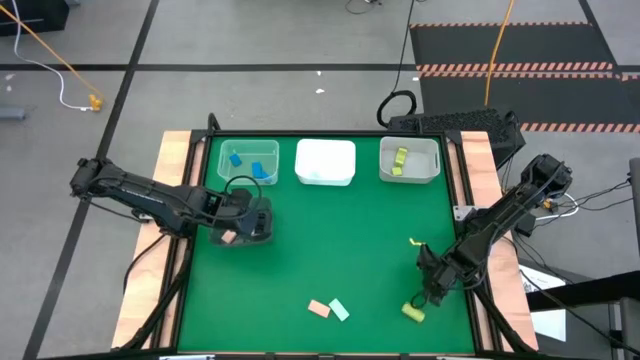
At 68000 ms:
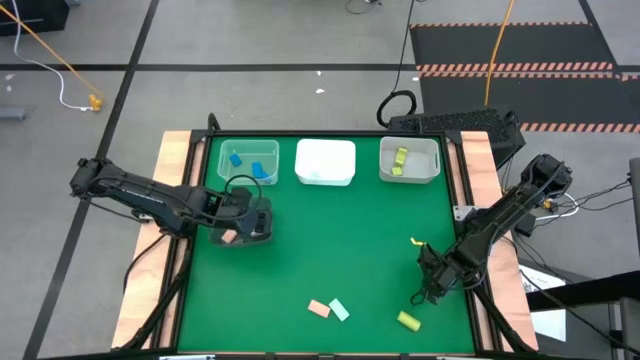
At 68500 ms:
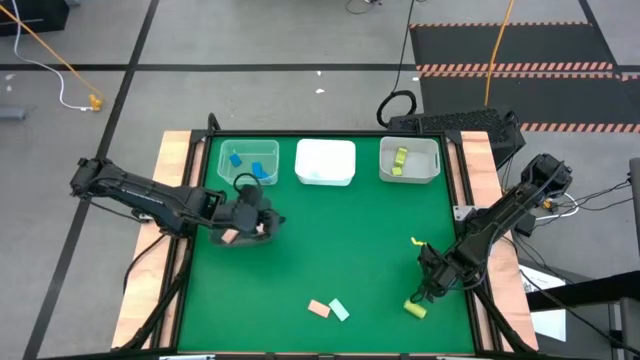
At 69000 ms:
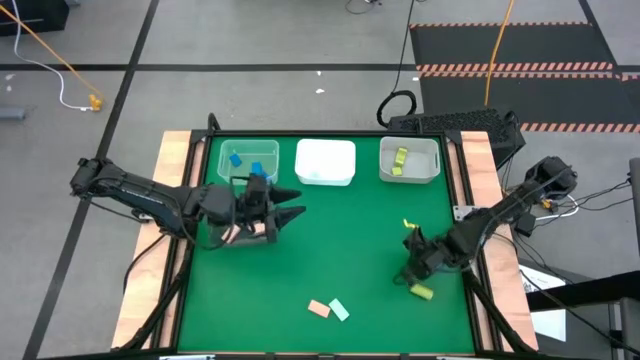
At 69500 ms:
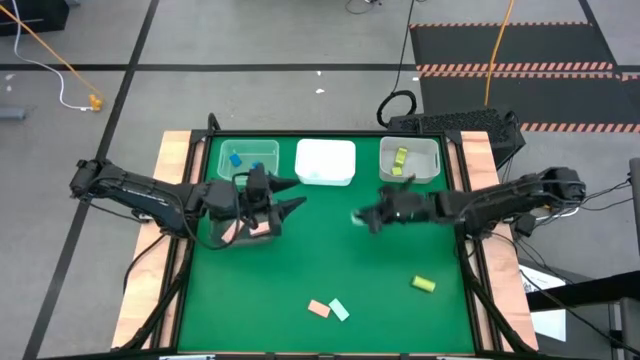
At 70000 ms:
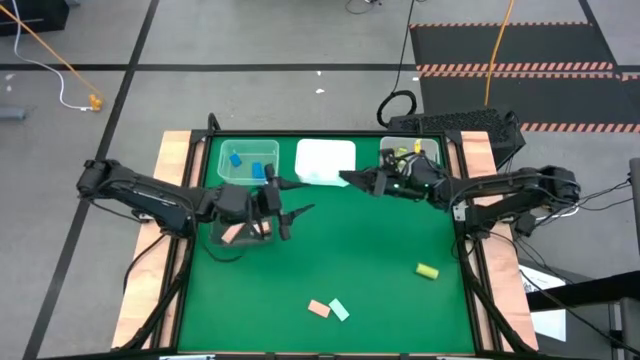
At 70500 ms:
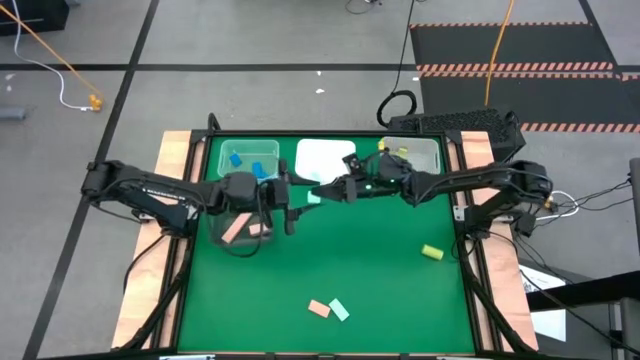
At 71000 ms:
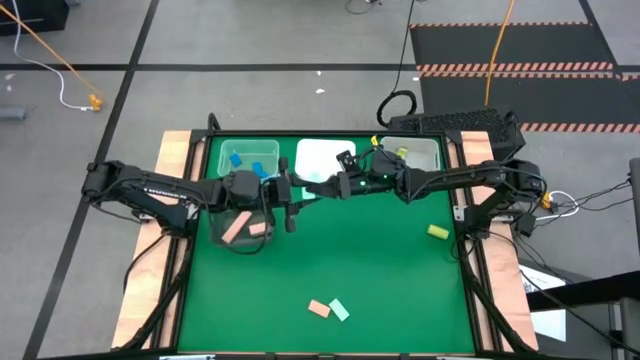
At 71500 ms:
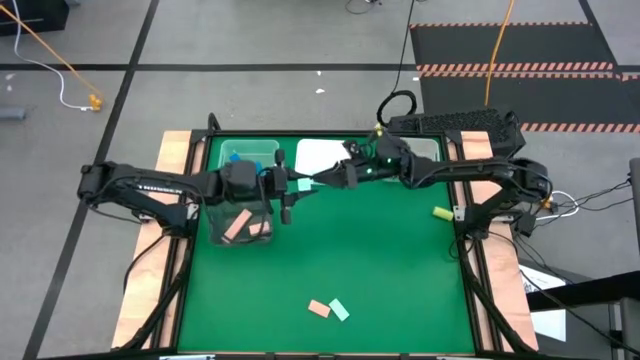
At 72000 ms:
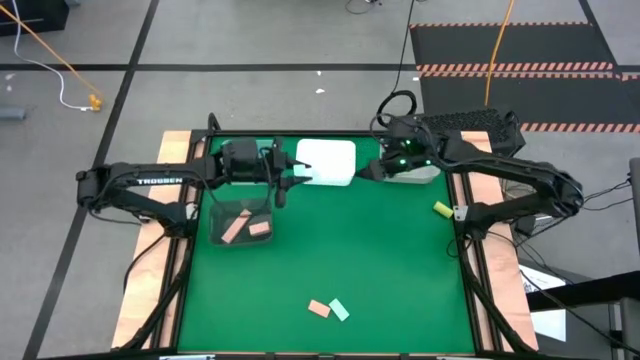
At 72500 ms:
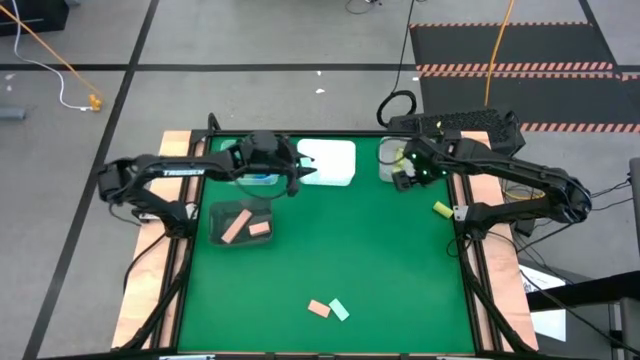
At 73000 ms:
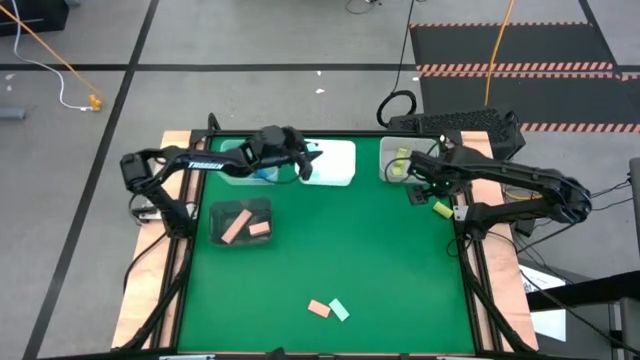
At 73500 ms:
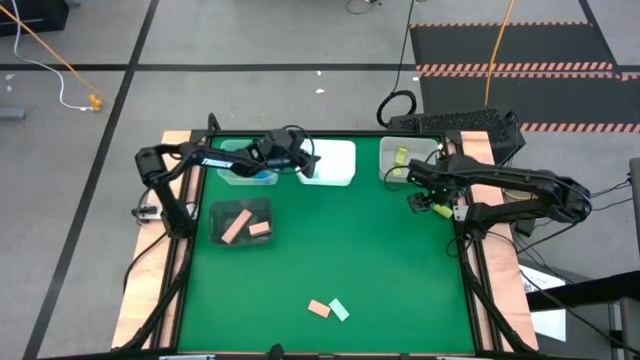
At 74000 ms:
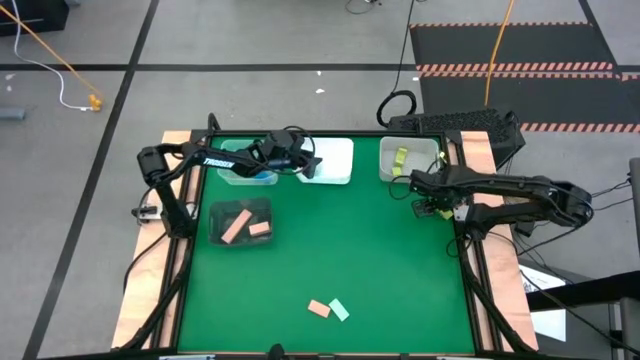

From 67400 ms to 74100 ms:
Task: Sort & place blocks by color
Put the light blue block into the white bin

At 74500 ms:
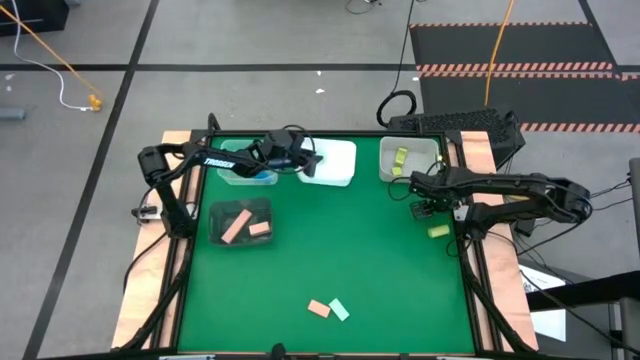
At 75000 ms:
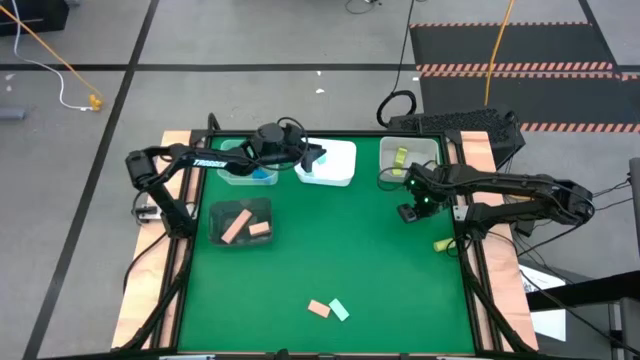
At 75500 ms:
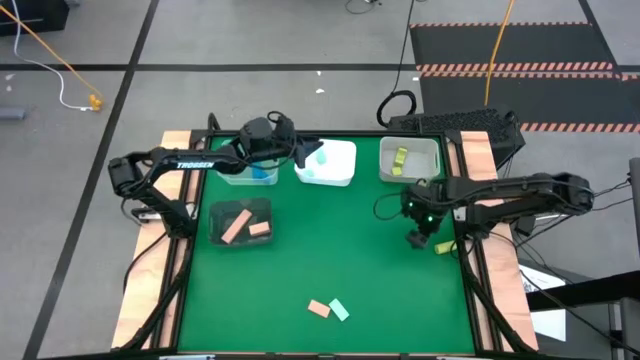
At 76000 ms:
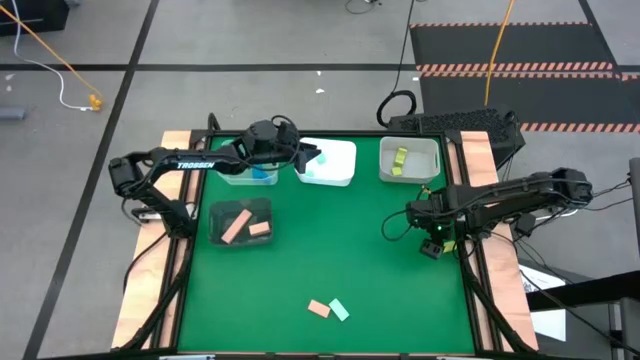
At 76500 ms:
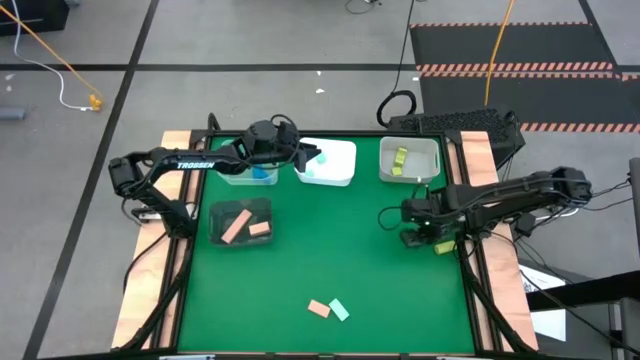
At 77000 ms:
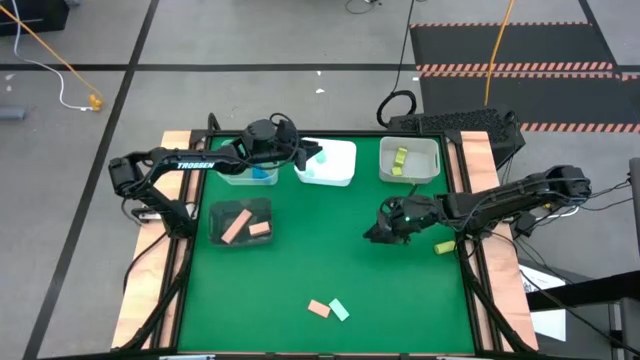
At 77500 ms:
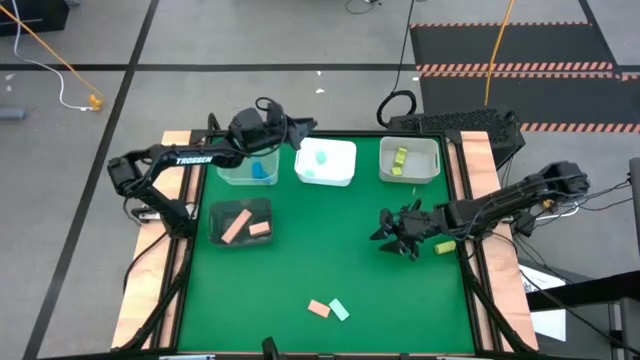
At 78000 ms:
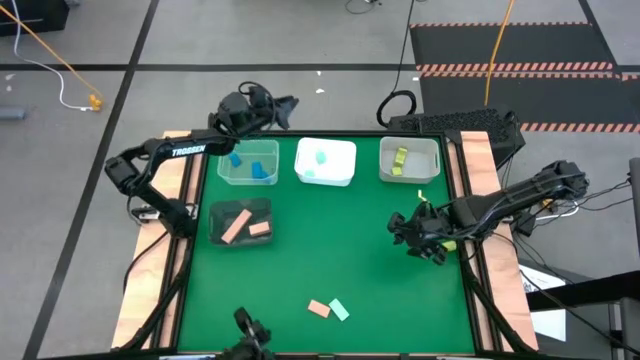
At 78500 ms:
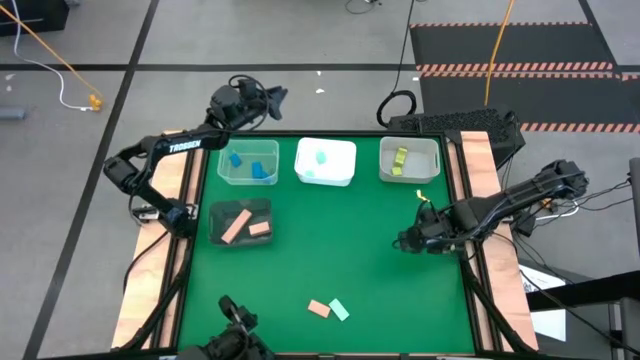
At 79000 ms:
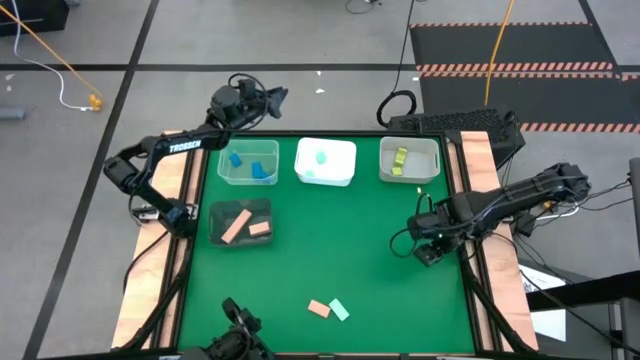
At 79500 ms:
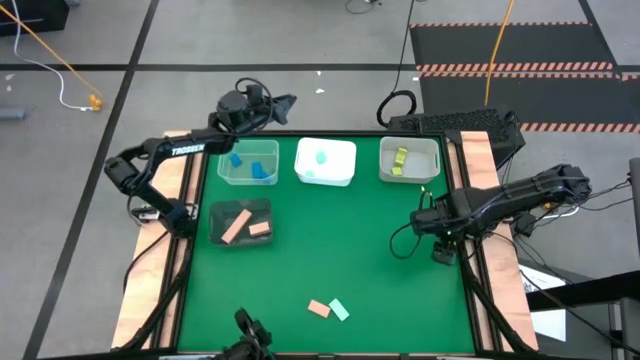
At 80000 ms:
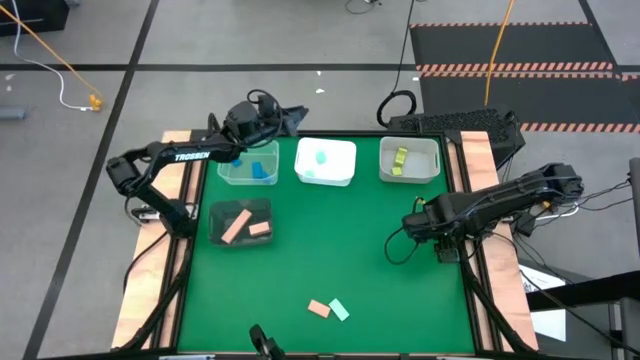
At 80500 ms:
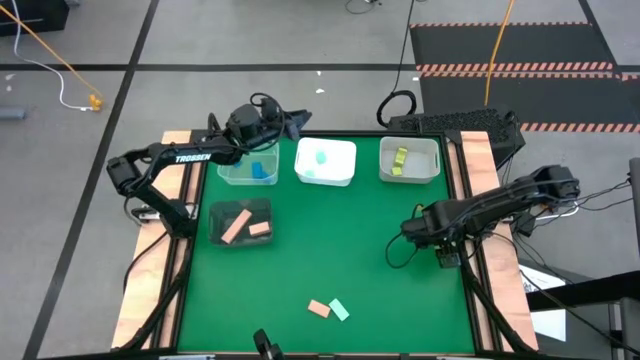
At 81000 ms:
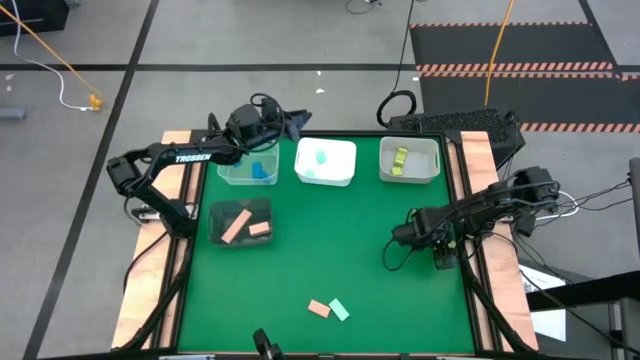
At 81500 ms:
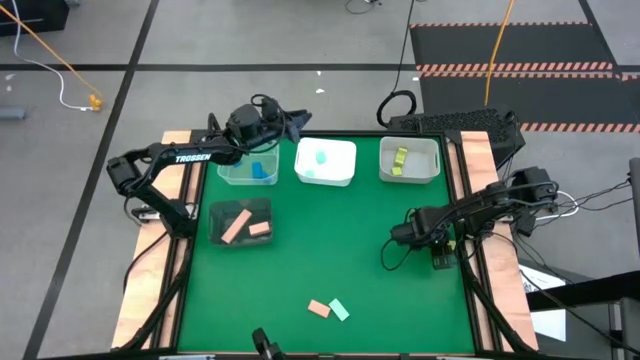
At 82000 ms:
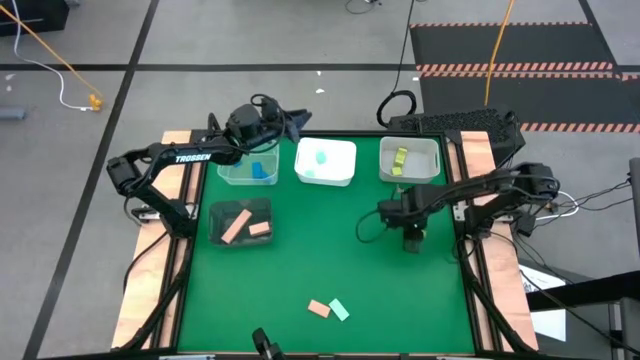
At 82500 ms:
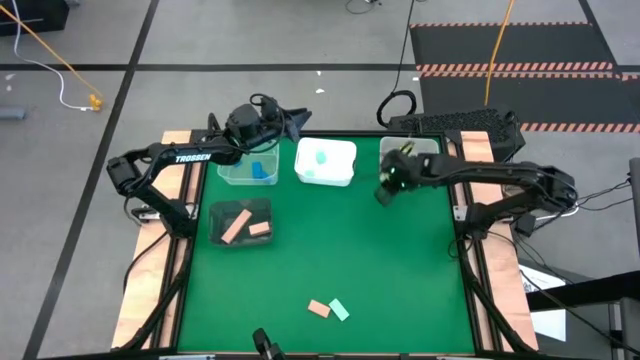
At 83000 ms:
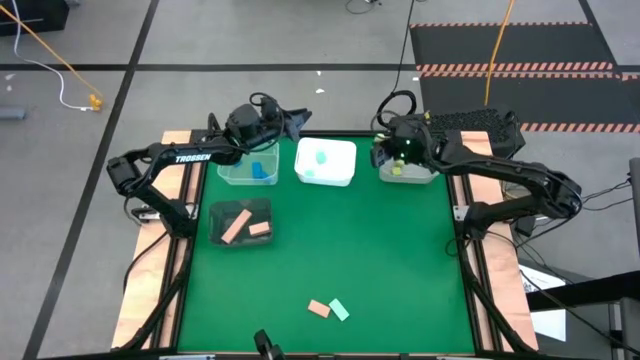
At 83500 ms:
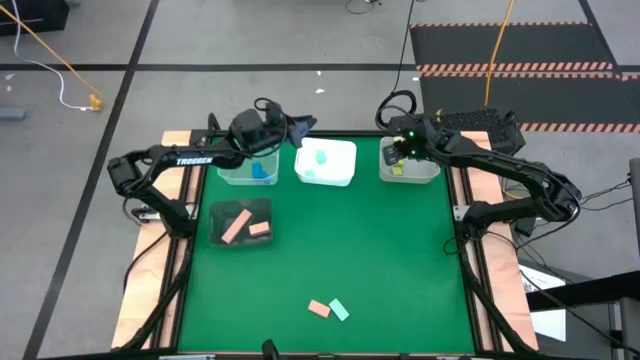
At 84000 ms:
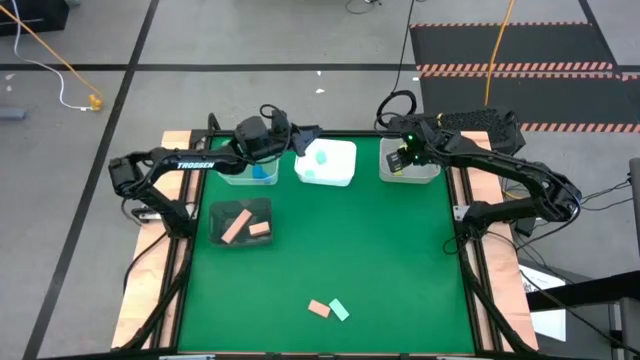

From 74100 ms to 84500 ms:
Put the light green block into the gray bin
